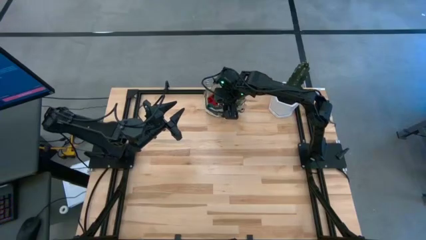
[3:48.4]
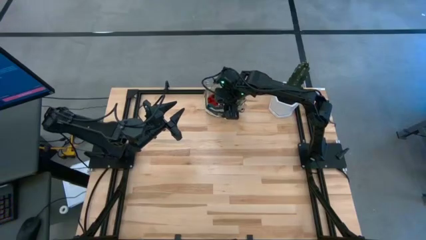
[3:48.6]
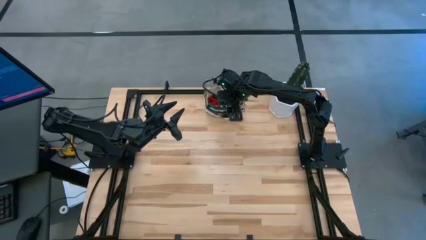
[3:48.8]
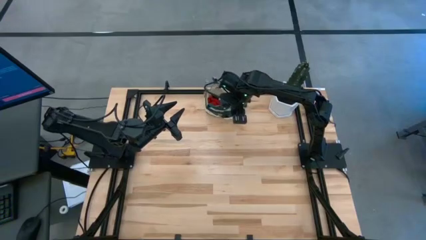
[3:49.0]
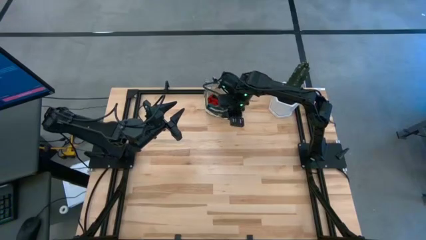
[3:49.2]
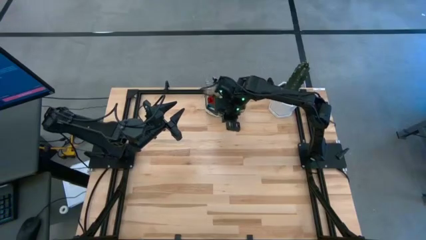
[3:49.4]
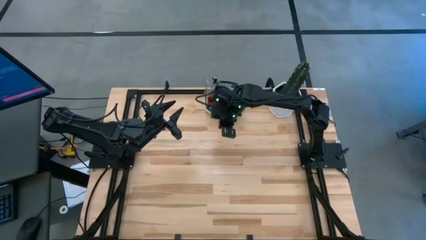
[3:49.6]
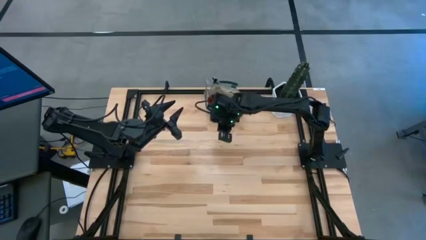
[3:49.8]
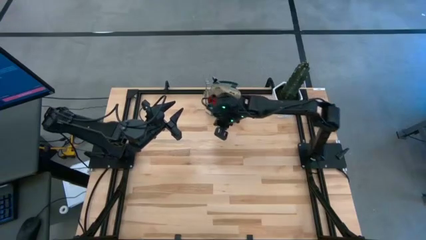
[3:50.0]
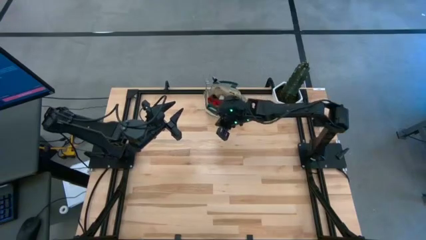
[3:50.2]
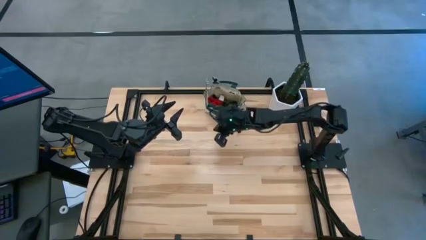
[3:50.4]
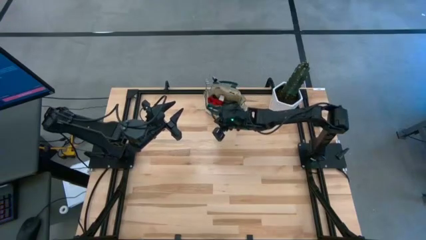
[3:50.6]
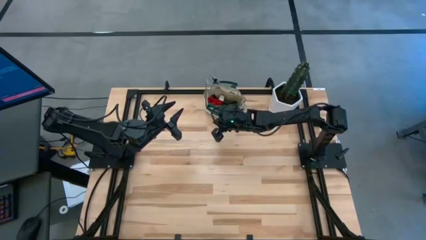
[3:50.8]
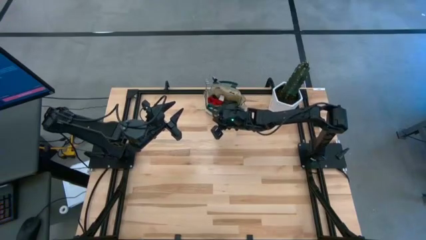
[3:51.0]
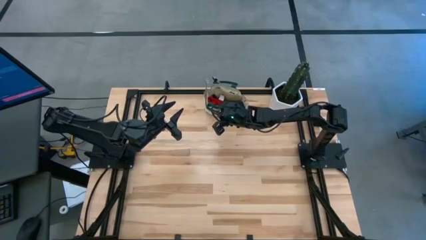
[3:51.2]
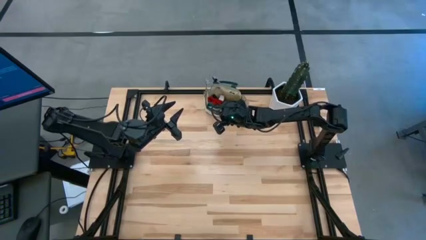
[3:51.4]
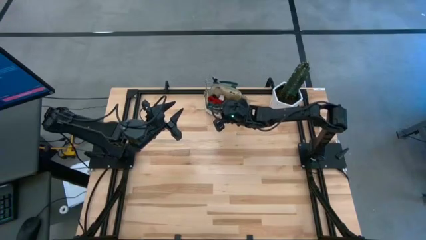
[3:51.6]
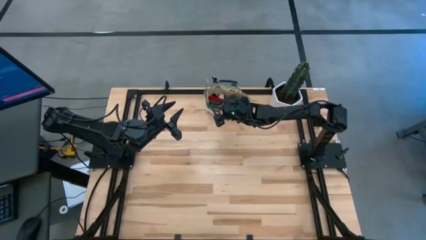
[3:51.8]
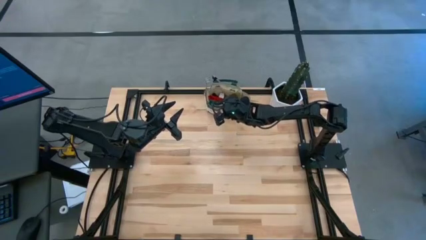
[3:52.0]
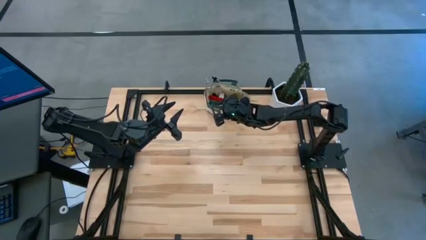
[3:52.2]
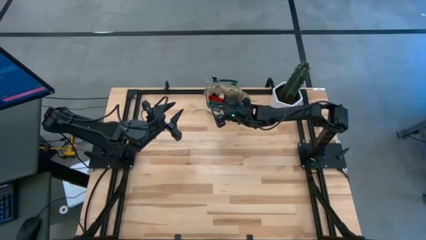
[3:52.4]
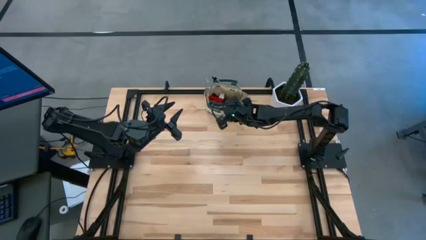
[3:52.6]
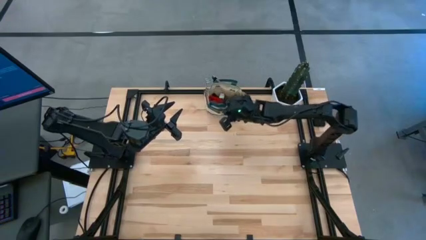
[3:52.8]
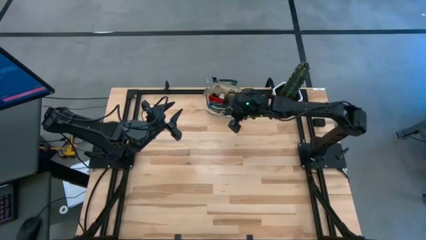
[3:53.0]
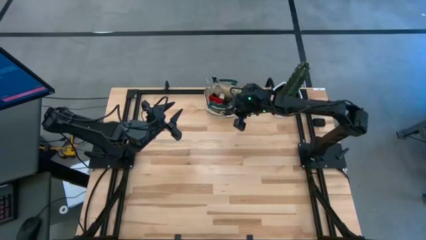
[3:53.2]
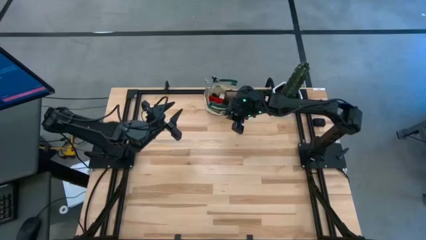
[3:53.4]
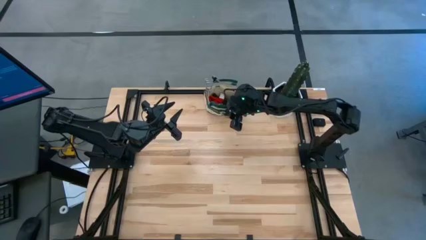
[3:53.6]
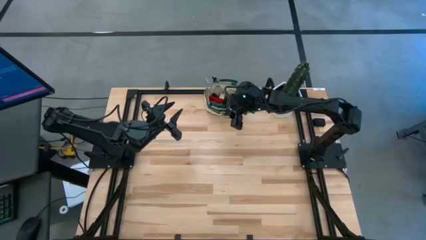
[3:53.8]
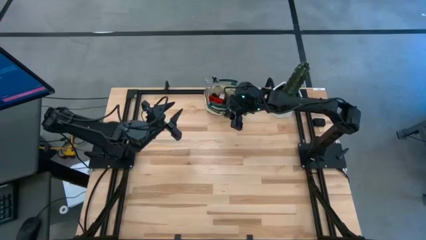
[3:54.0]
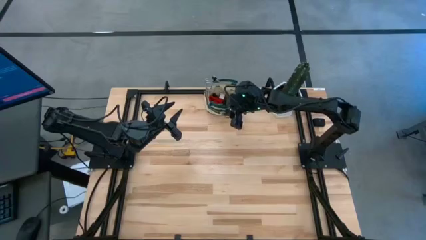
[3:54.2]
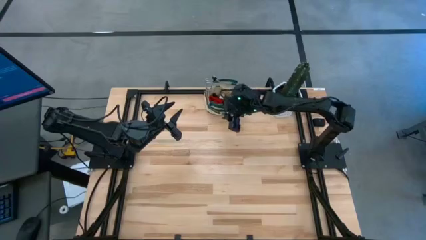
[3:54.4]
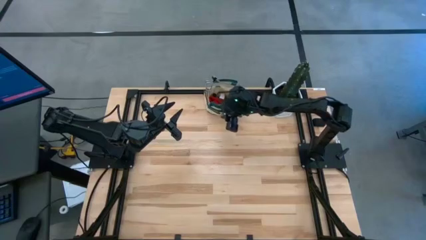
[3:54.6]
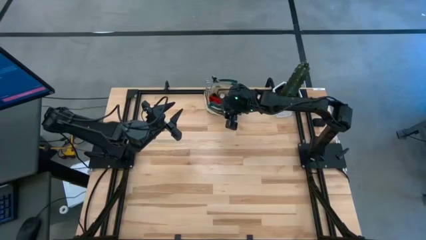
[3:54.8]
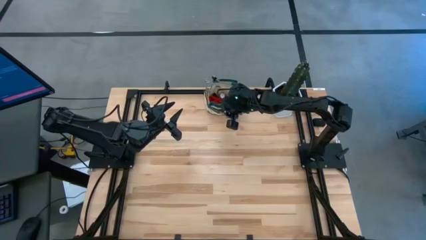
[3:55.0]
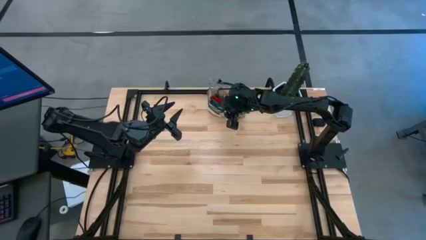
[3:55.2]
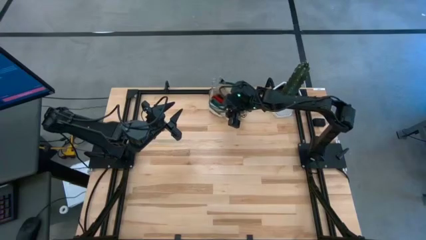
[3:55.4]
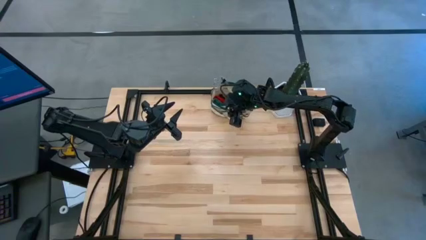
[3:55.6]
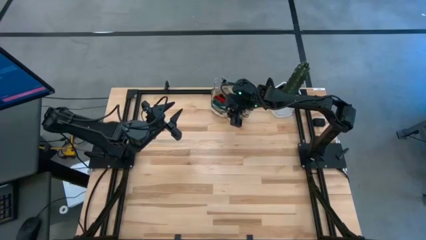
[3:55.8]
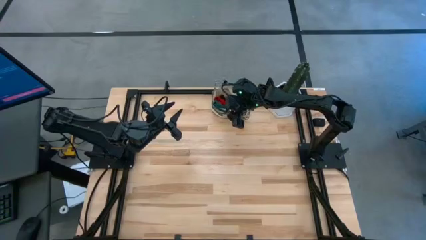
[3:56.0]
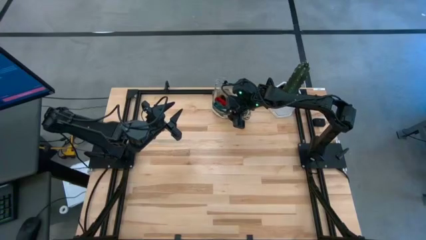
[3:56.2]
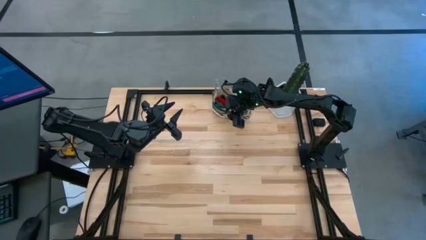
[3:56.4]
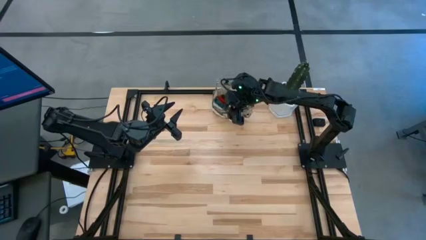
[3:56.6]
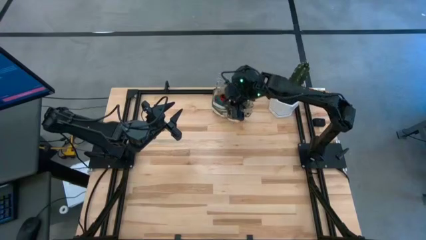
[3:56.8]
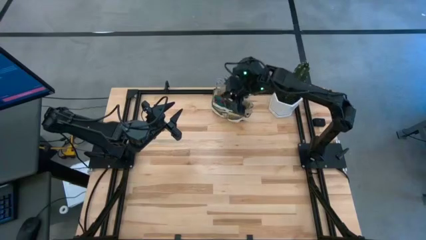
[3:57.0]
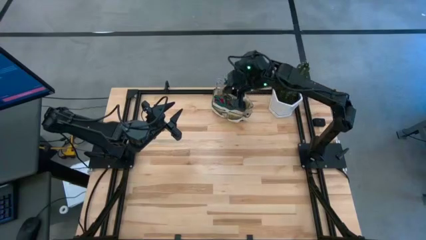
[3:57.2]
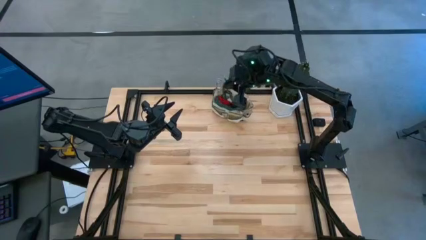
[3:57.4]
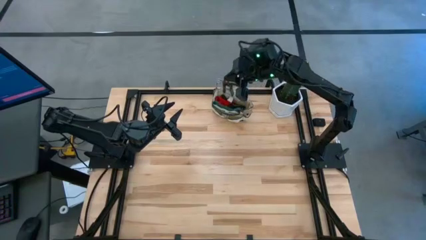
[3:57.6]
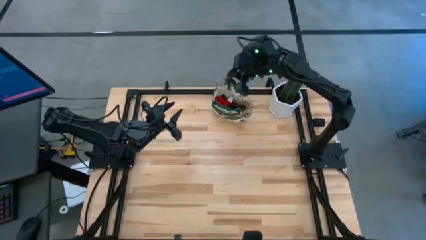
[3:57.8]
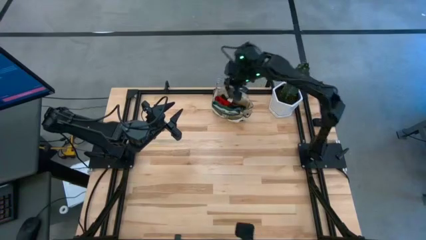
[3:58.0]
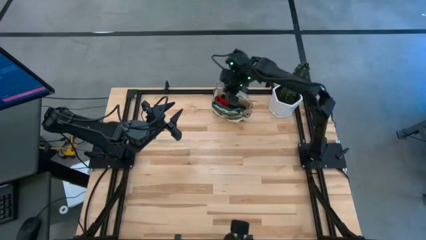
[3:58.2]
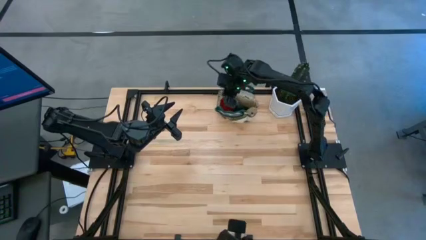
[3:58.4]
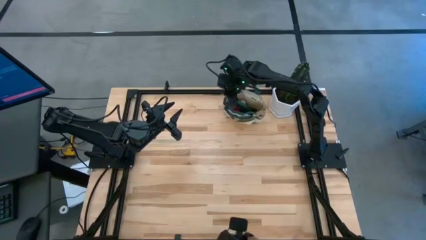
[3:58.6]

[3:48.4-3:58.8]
Task: Pick & Place Garden tools in Gardening bag
Put the green shears into the brown gardening bag

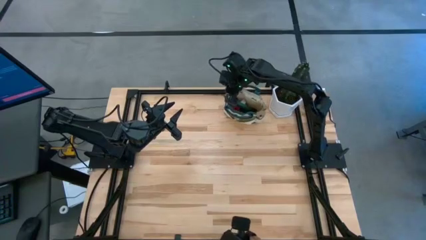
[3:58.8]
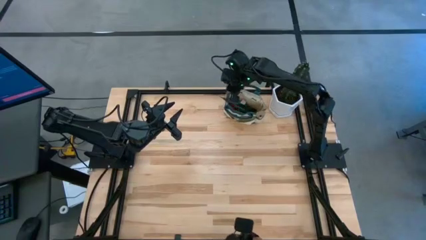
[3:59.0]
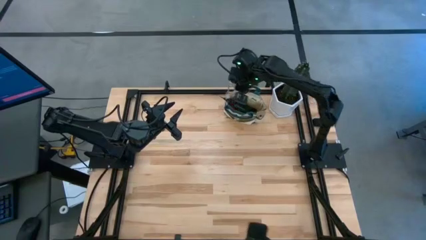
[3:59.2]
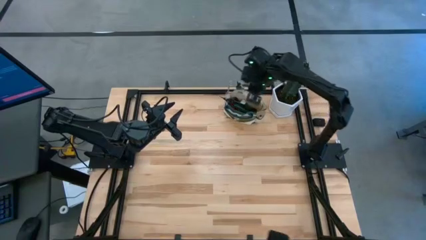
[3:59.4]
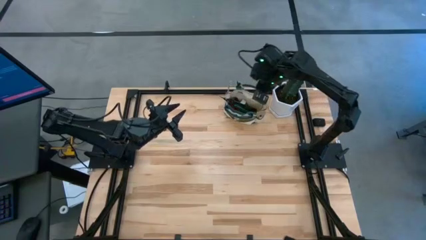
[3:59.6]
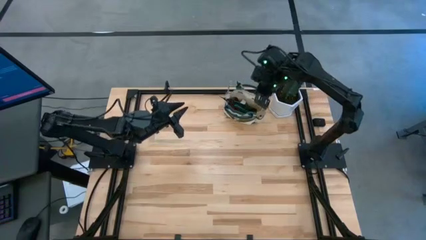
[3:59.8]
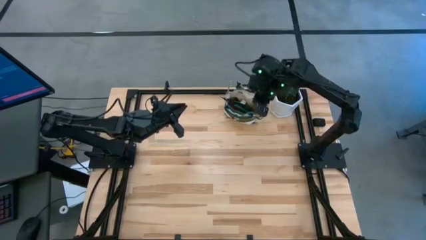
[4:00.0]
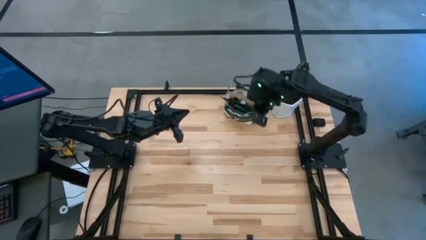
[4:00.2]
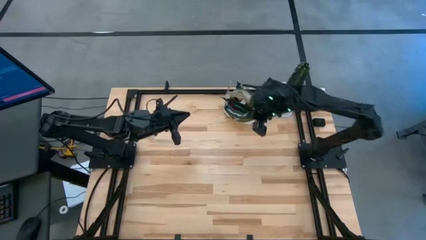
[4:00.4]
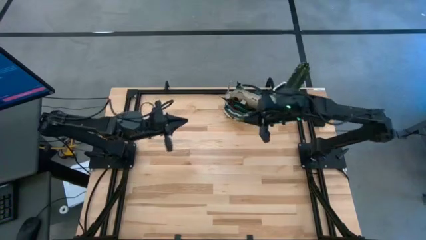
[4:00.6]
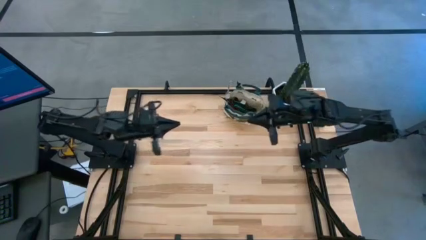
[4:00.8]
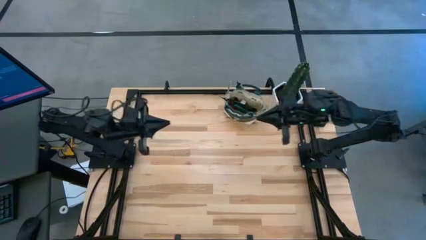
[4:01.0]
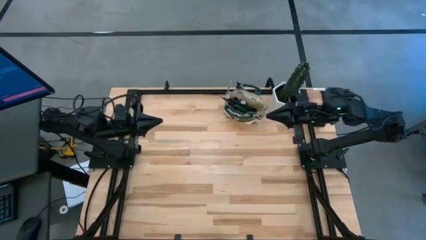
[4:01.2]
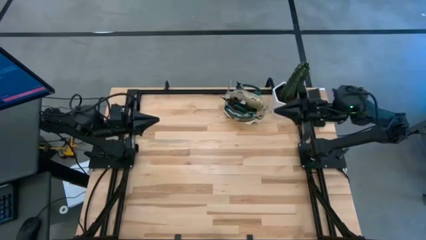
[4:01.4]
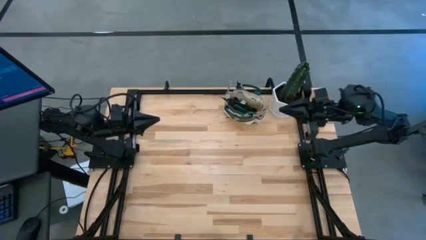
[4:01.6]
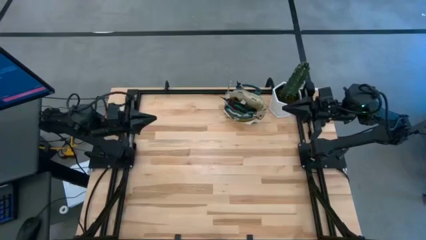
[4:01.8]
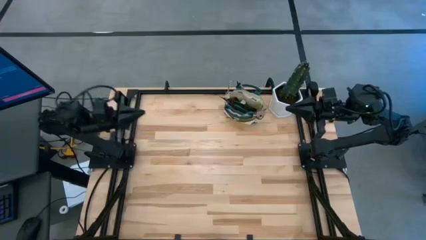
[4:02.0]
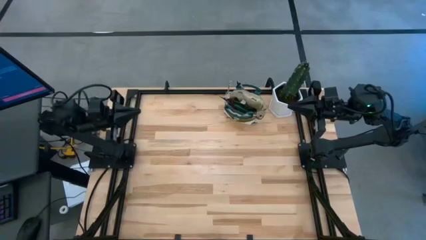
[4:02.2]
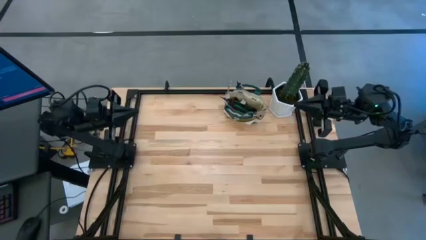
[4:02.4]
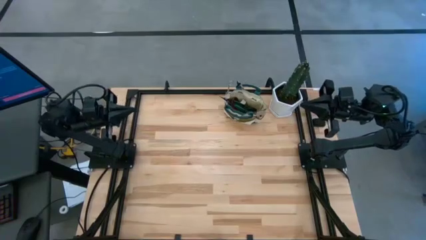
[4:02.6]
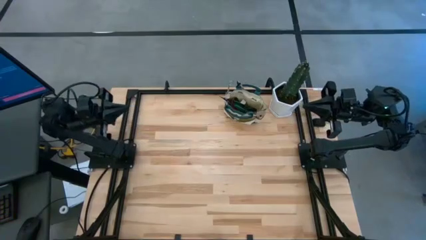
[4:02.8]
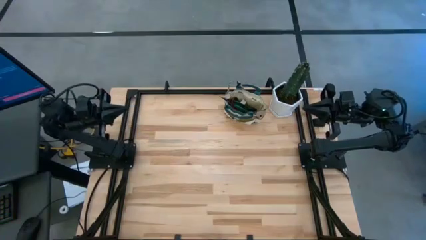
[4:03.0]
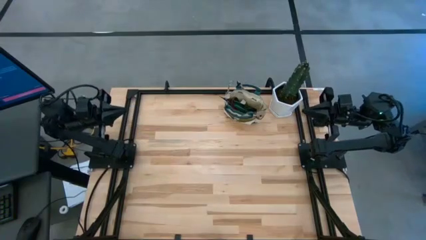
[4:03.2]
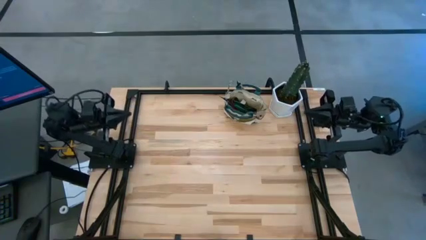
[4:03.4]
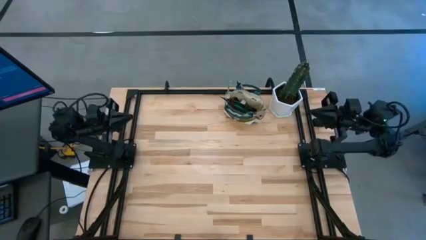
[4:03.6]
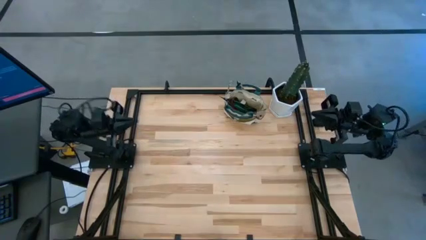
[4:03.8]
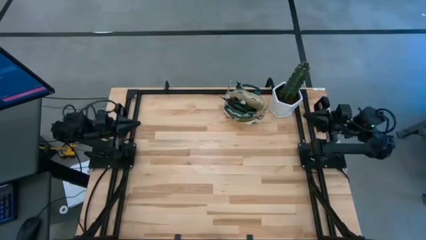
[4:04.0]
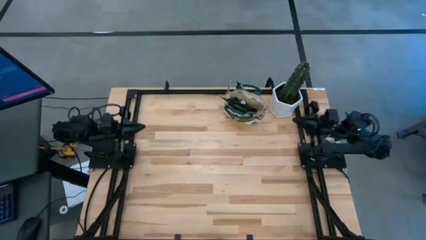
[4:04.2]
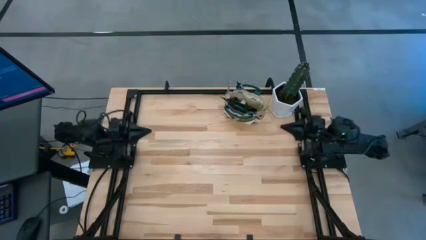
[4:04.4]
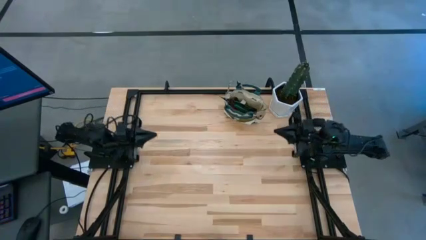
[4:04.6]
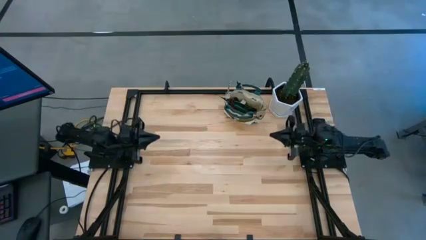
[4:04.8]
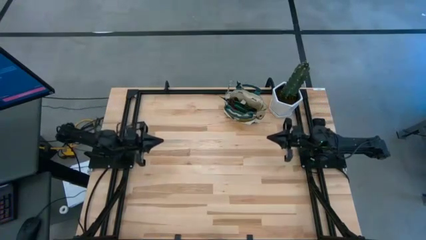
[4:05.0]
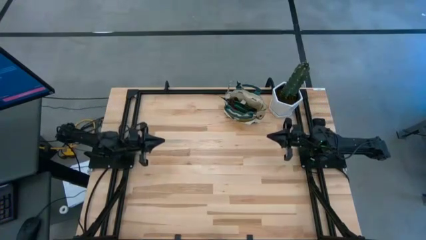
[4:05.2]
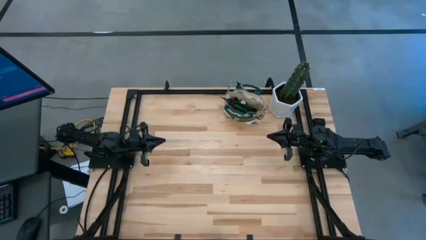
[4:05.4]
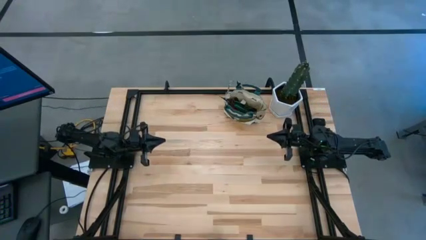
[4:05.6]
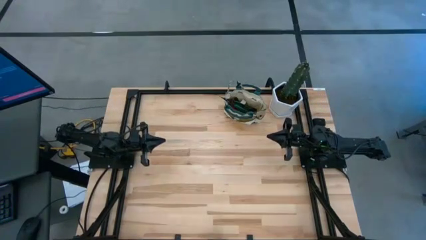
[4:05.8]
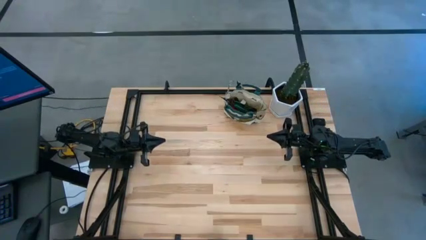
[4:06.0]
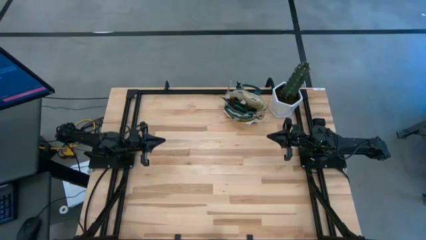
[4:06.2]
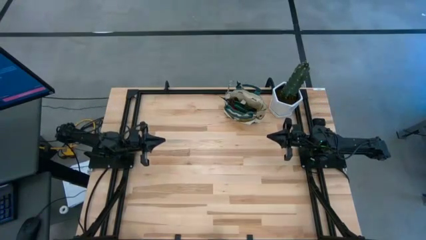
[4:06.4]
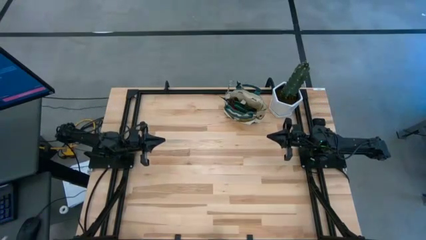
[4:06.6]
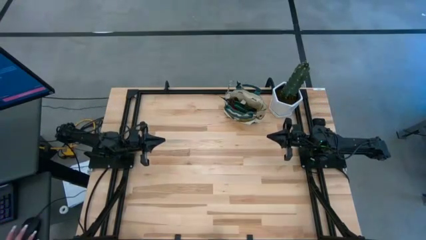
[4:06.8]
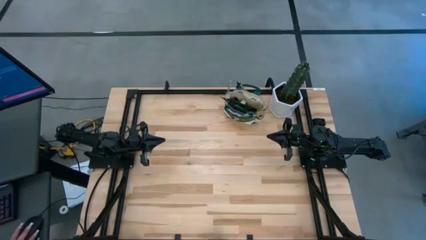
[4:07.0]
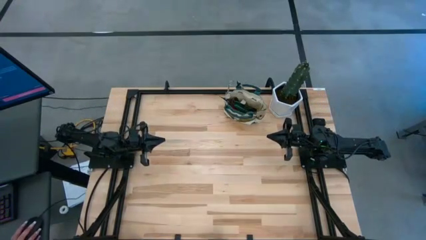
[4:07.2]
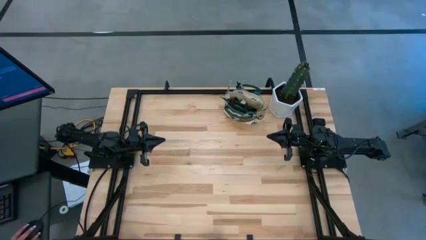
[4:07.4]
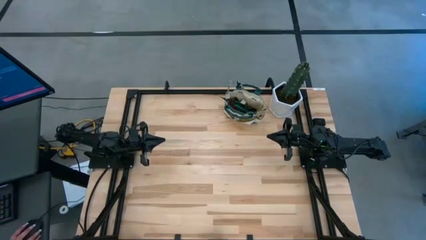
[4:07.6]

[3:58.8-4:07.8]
Return to Home Position
